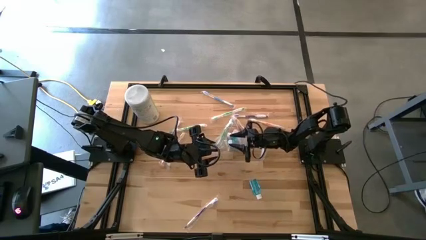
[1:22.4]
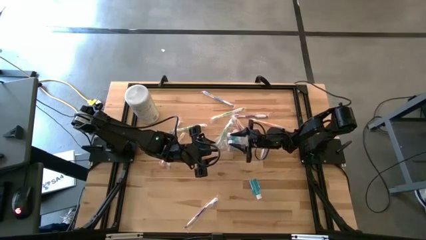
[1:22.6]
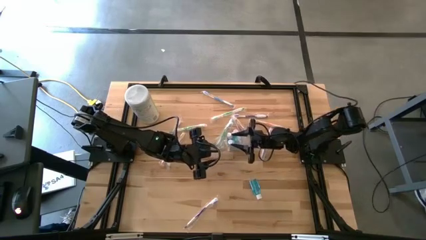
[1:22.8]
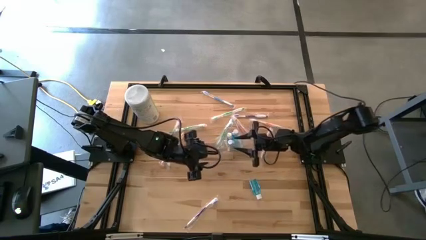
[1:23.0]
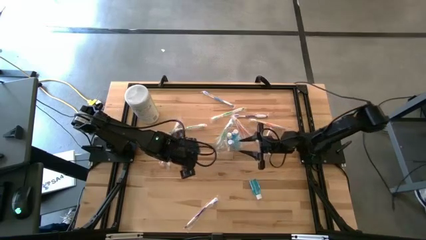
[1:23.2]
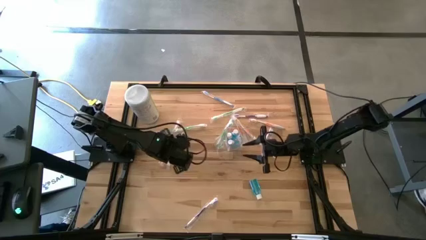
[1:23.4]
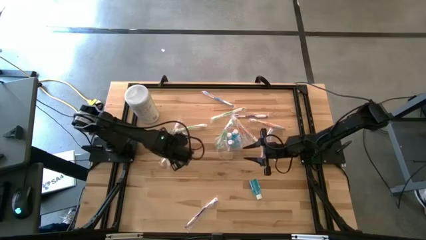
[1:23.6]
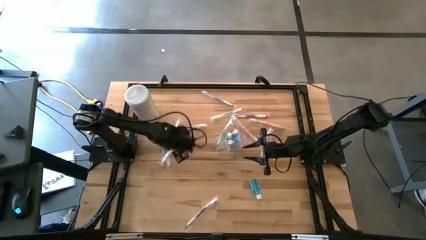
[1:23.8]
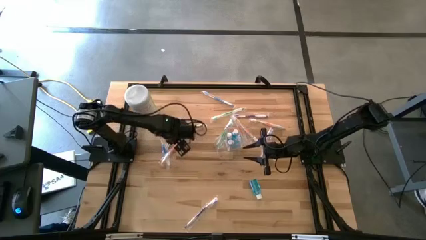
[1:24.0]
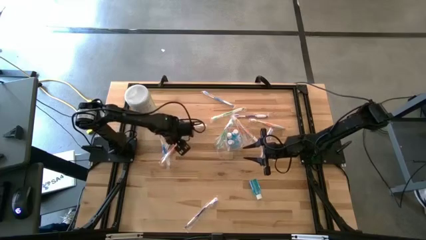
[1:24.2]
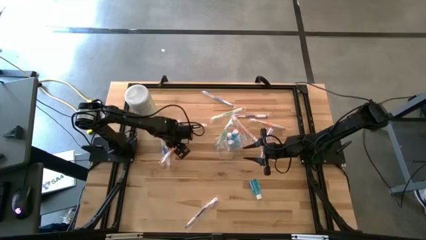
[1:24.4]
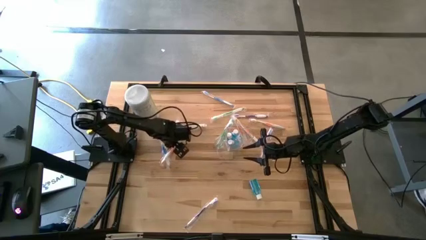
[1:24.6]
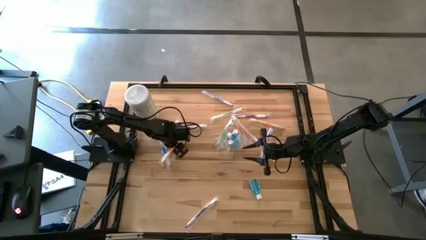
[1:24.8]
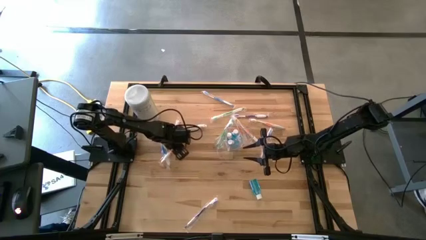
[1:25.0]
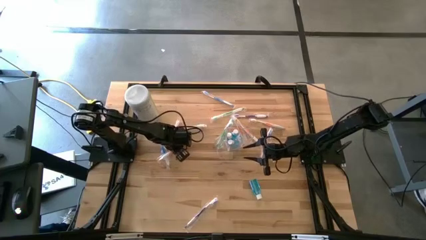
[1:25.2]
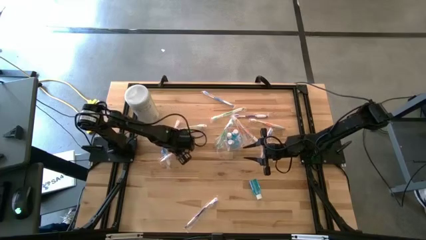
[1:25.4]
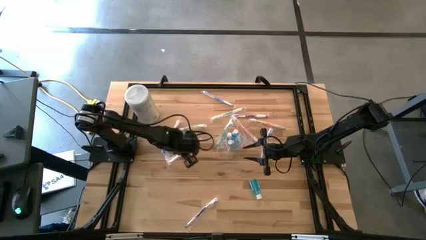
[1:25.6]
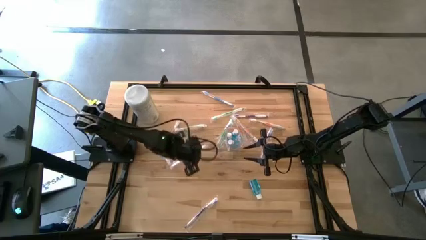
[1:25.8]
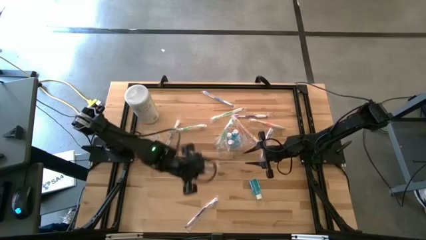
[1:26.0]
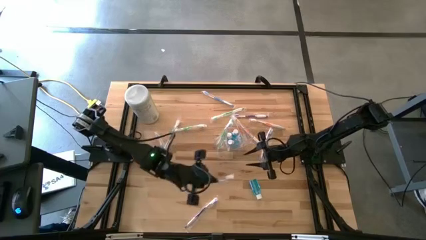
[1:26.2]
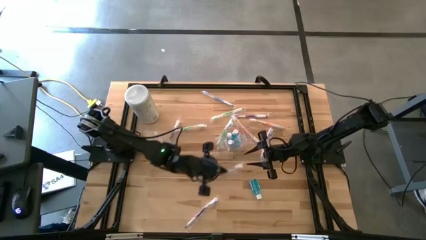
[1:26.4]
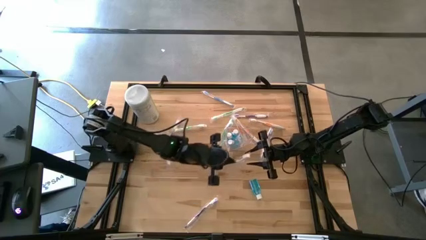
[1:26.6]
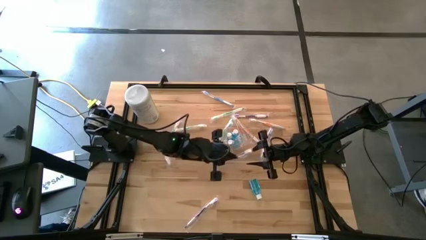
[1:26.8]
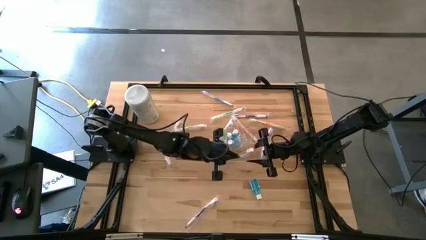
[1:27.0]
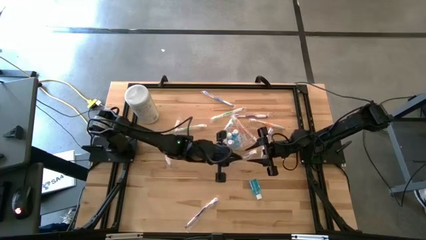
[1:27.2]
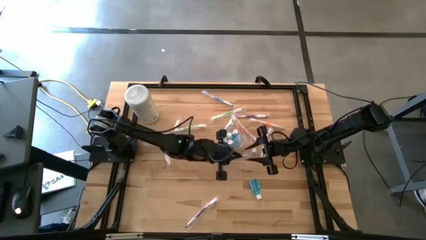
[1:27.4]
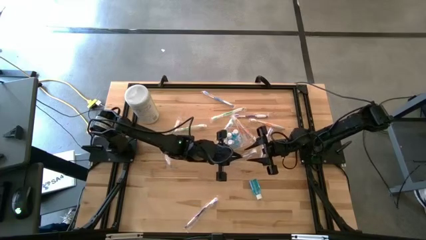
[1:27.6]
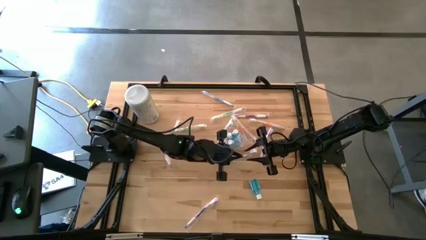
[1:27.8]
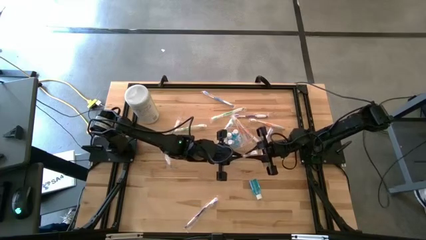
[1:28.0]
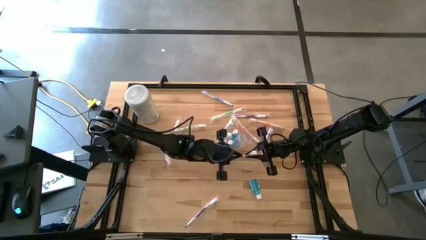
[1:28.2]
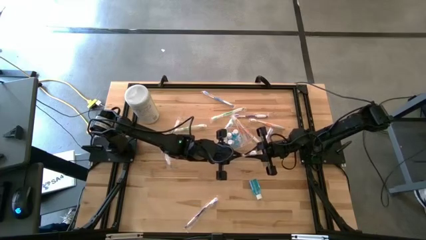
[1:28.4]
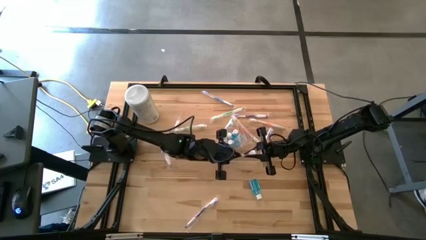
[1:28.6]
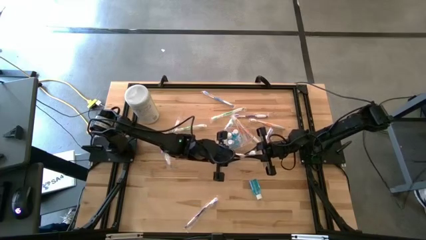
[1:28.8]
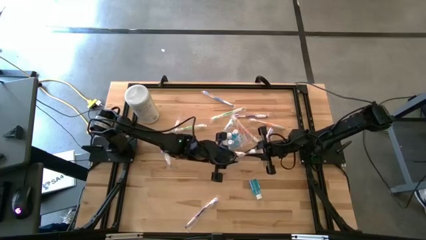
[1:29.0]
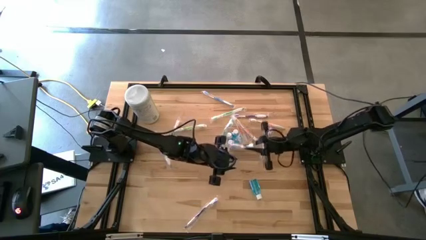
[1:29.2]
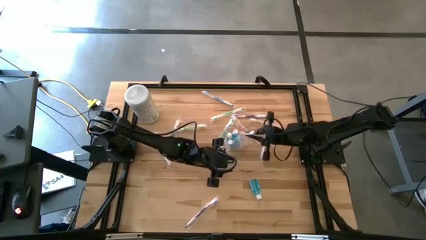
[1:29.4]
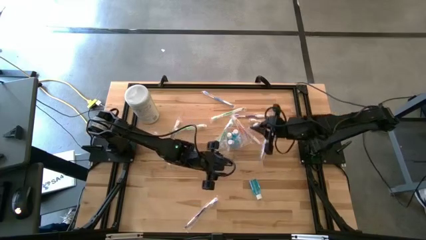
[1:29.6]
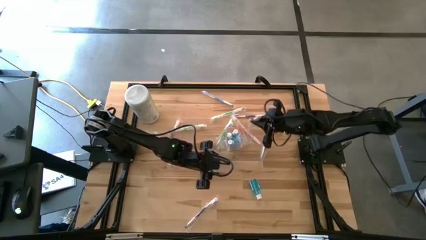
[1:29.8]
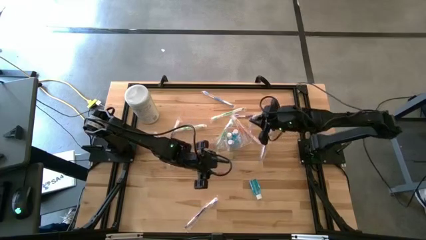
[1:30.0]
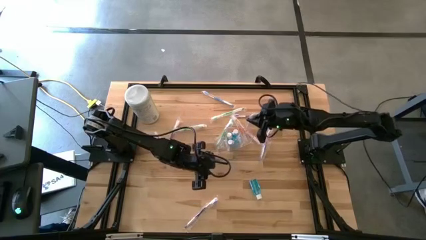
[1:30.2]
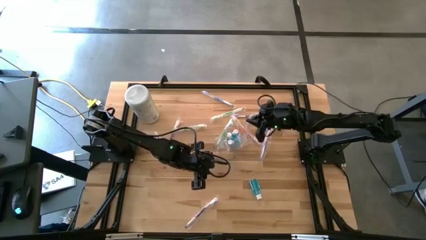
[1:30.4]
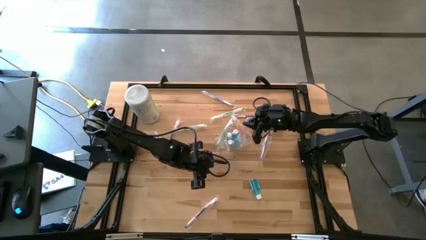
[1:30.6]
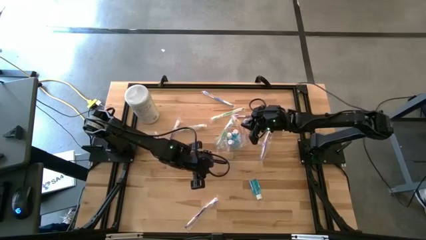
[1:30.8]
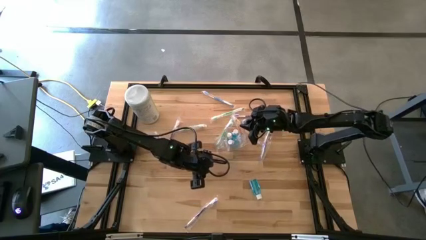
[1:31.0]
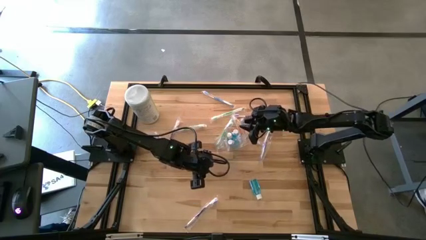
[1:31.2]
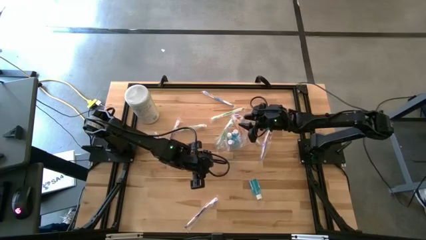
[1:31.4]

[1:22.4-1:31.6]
Task: Pick & Place toothbrushing station
Put the orange toothbrush into the transparent organizer

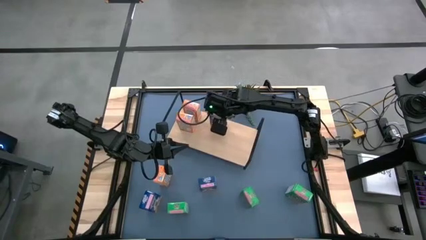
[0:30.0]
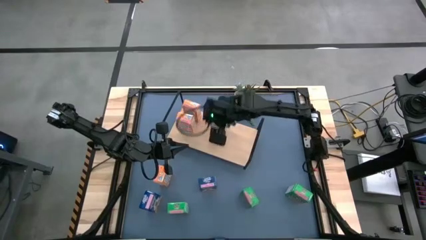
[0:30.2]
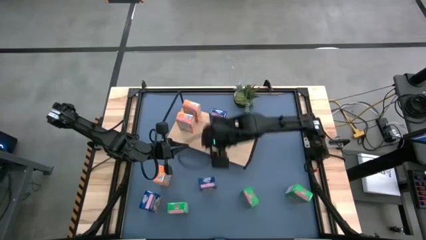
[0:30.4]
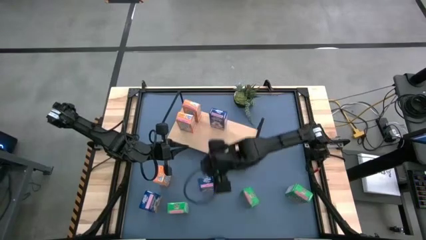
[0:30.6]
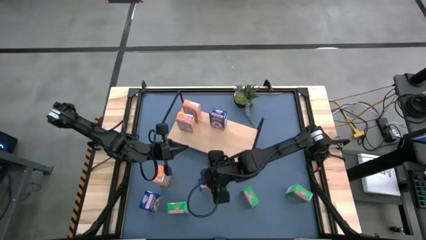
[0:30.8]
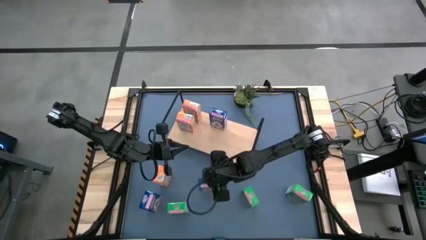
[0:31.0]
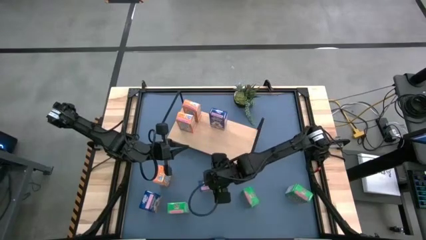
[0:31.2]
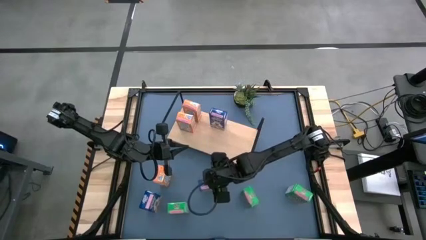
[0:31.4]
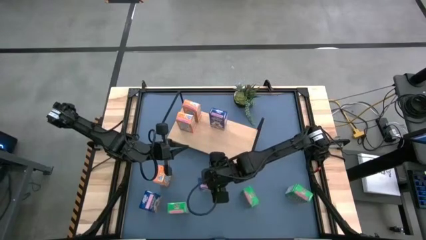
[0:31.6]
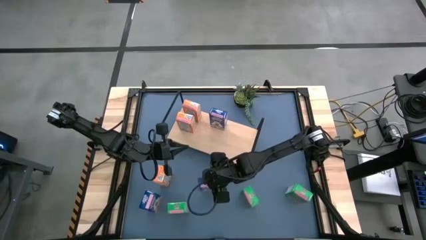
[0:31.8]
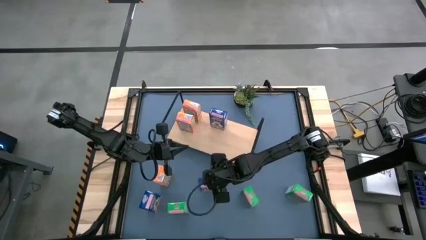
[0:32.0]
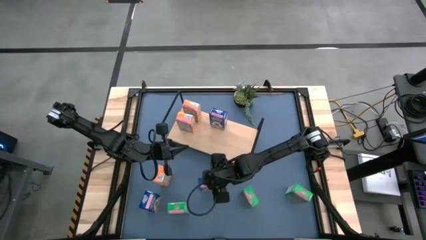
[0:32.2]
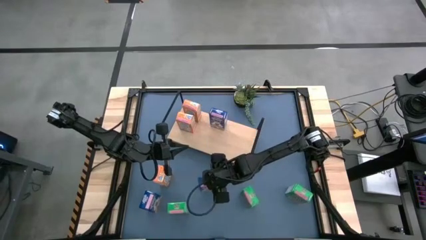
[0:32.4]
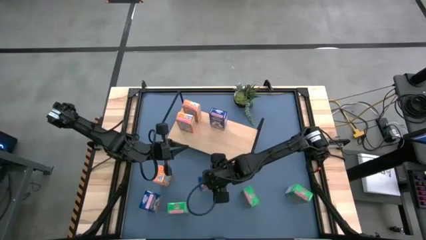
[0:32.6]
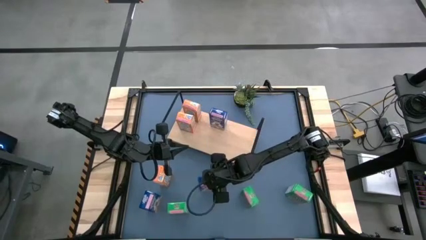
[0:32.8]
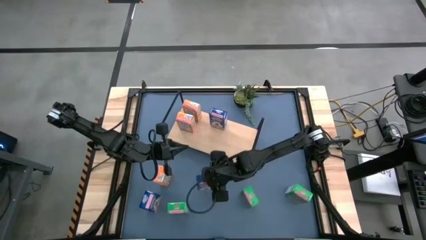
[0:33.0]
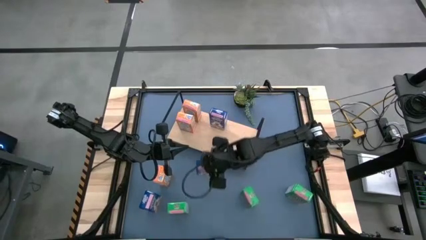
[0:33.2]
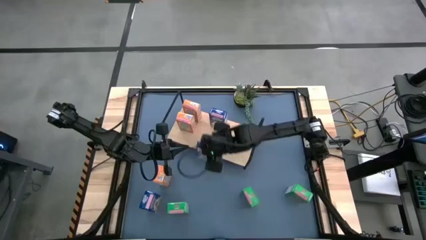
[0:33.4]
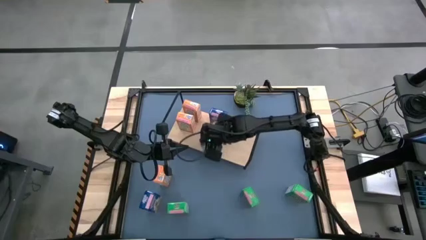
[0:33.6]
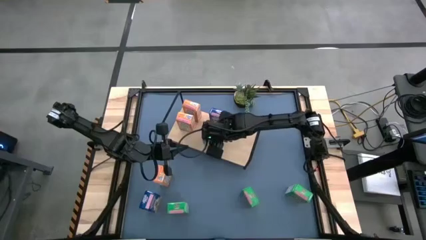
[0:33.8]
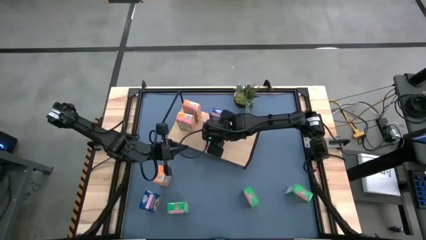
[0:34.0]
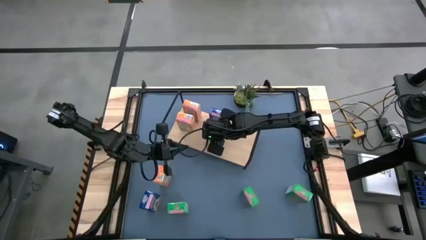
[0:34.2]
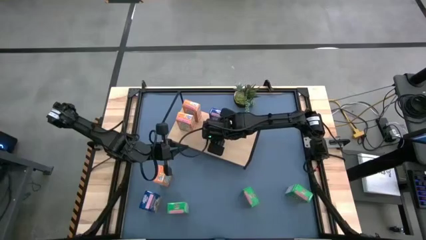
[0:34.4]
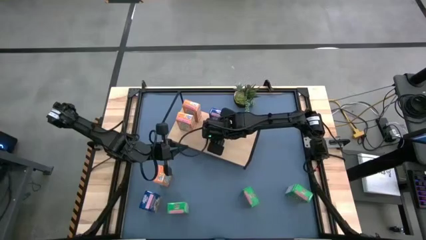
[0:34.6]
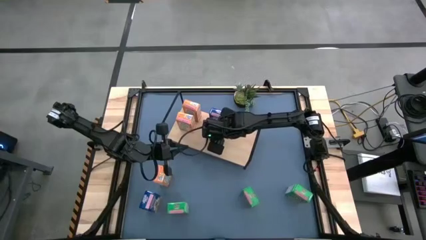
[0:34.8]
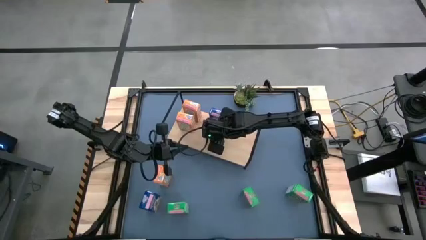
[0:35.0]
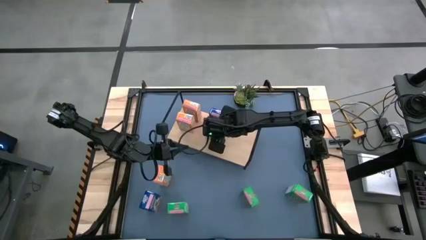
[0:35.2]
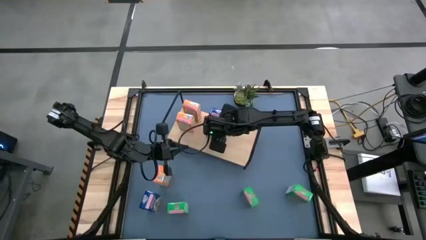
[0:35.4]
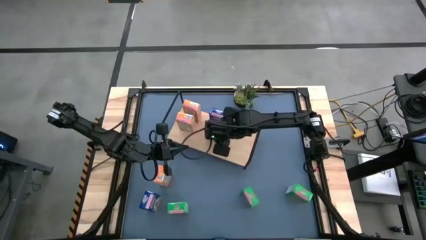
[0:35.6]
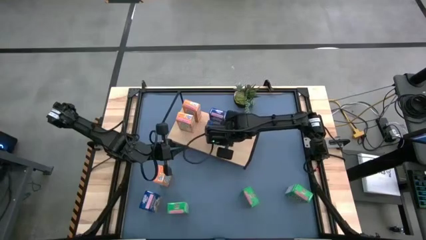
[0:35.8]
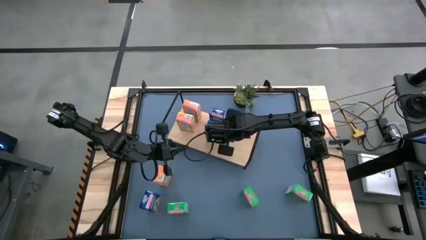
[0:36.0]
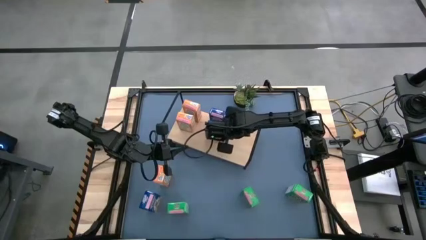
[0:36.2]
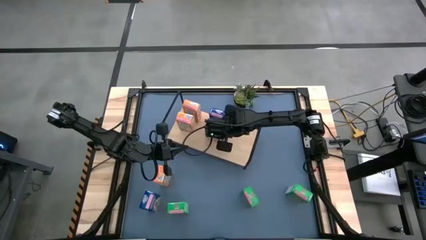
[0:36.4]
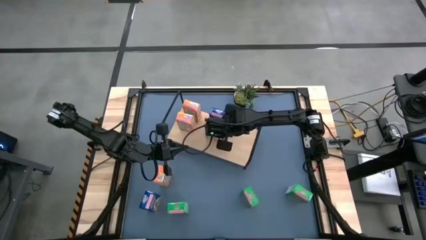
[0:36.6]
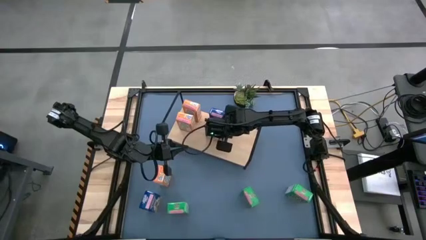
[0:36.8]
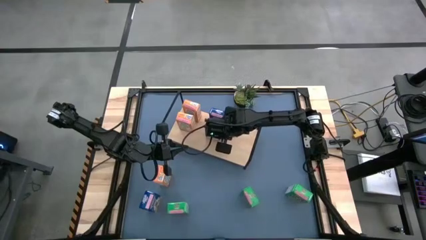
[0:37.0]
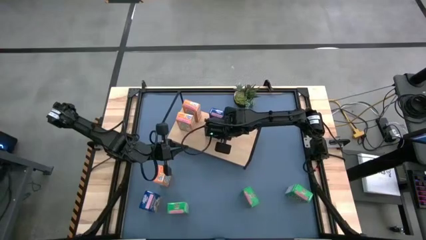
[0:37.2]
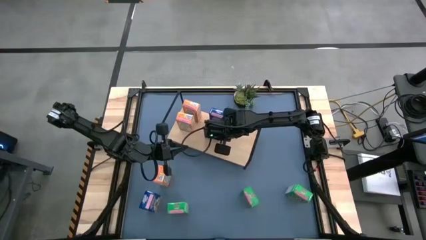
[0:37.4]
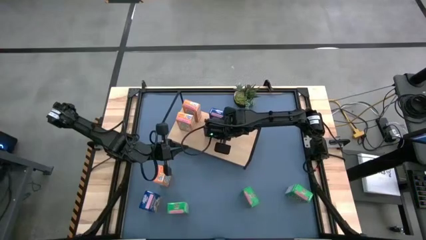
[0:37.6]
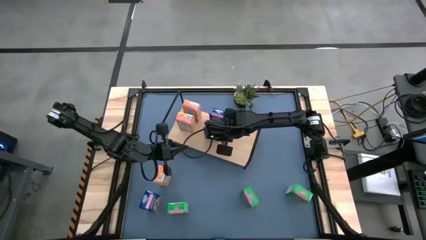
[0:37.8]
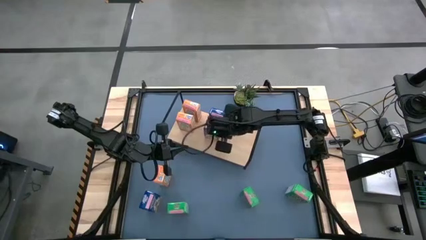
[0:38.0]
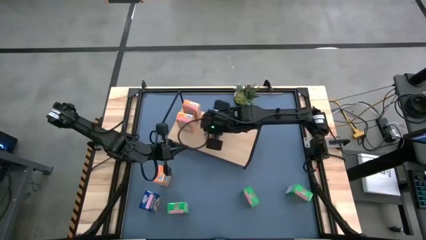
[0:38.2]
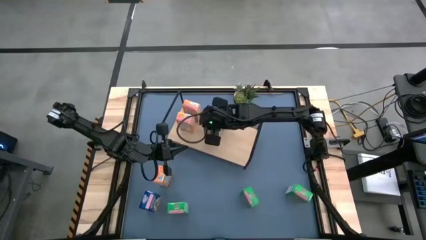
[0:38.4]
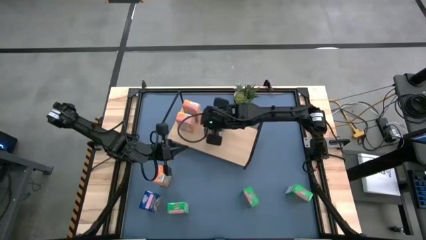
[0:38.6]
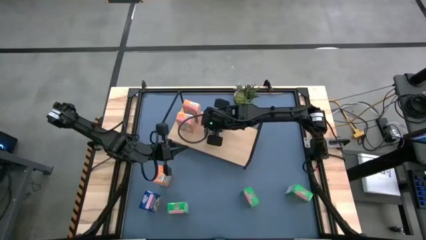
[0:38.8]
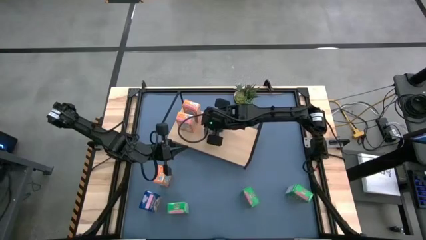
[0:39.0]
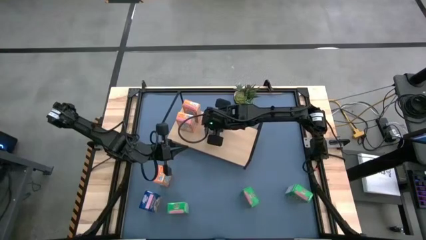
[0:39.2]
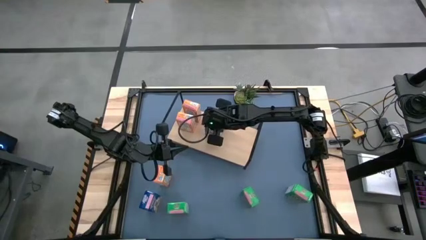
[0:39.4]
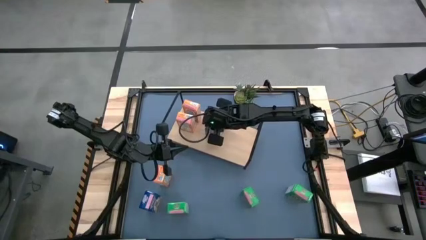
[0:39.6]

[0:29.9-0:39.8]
Task: Stack cereal on shelf
Put the right blue cereal box on the shelf aligned with other blue cereal box
